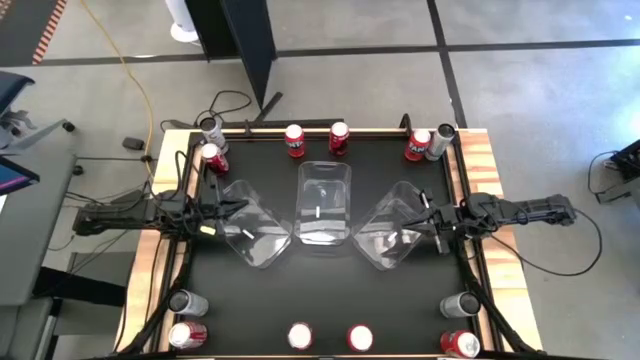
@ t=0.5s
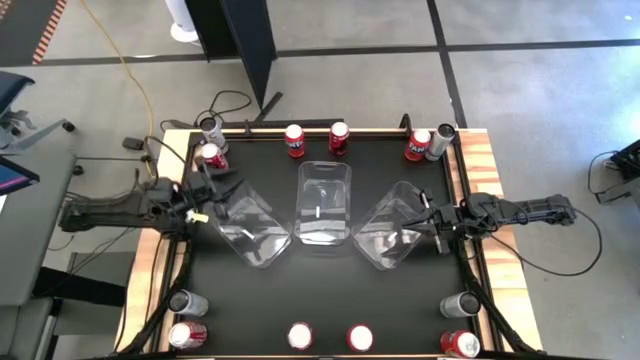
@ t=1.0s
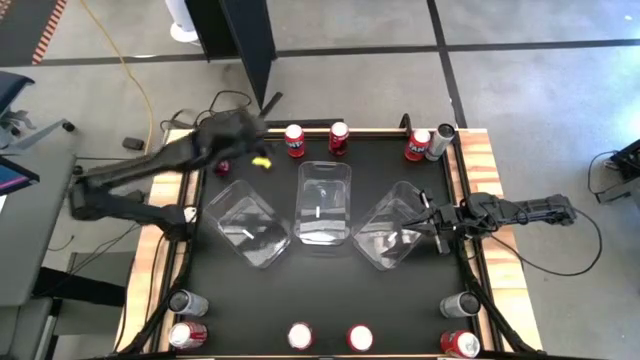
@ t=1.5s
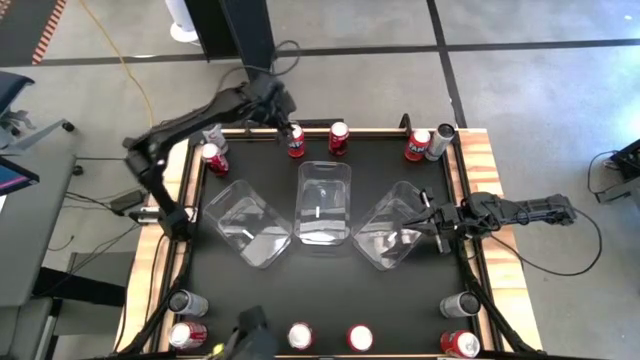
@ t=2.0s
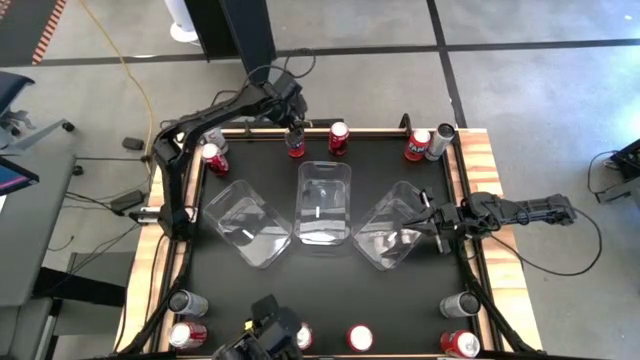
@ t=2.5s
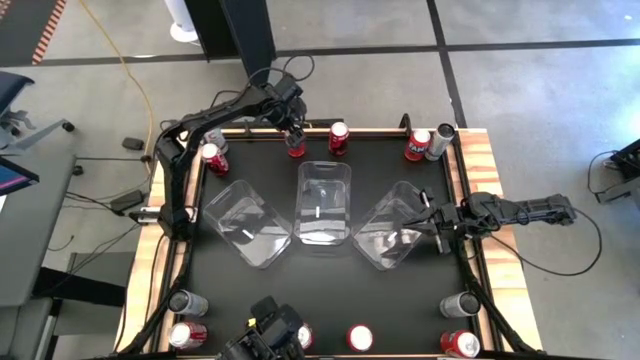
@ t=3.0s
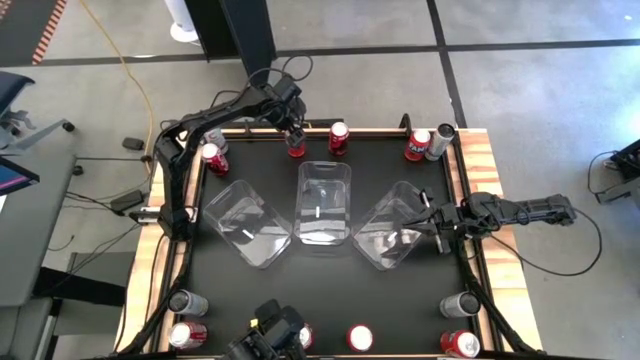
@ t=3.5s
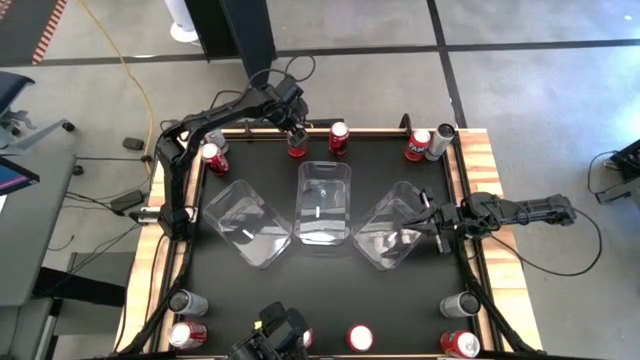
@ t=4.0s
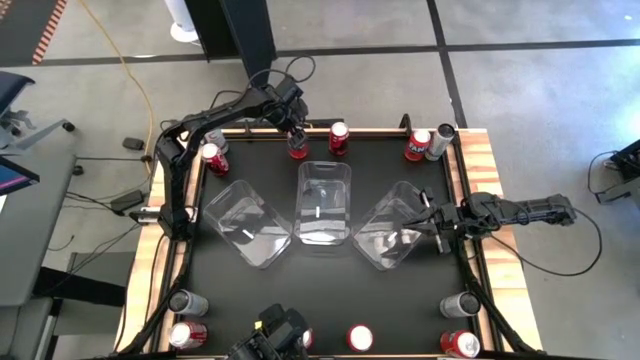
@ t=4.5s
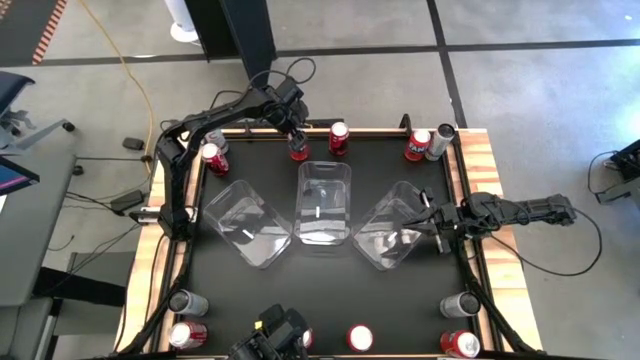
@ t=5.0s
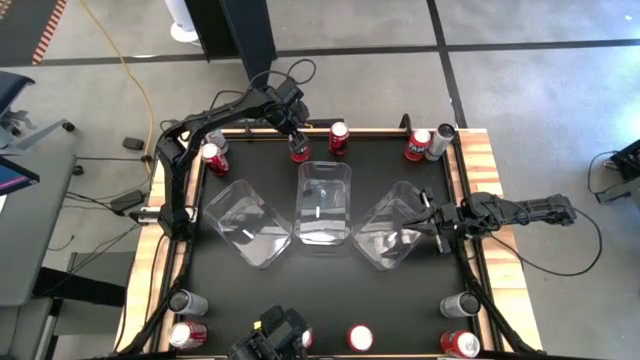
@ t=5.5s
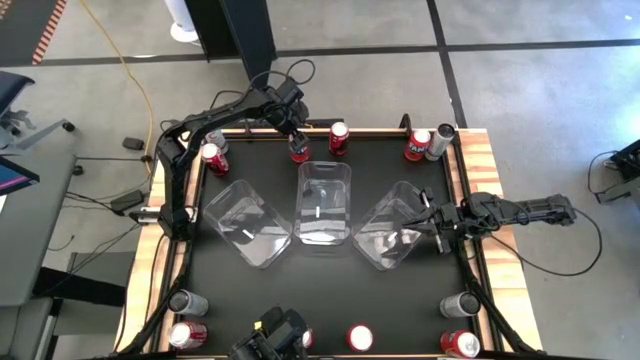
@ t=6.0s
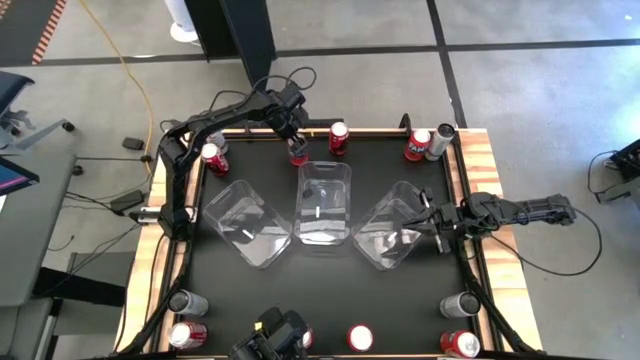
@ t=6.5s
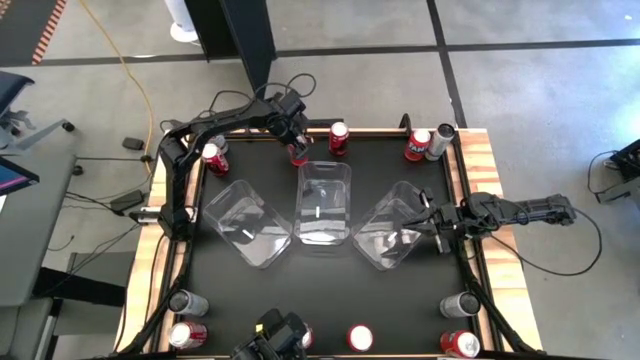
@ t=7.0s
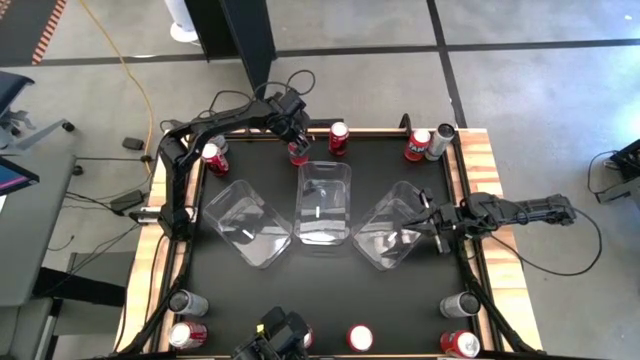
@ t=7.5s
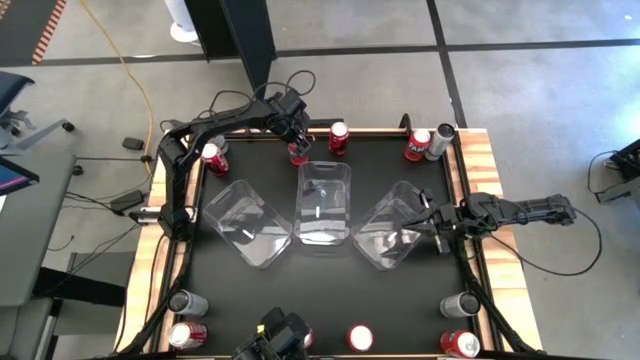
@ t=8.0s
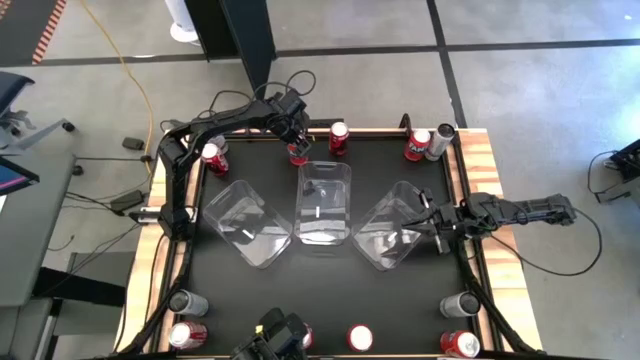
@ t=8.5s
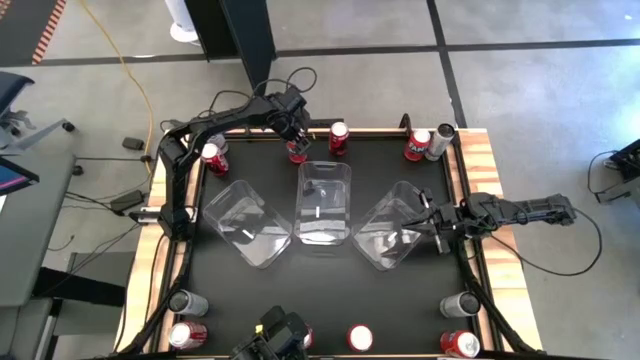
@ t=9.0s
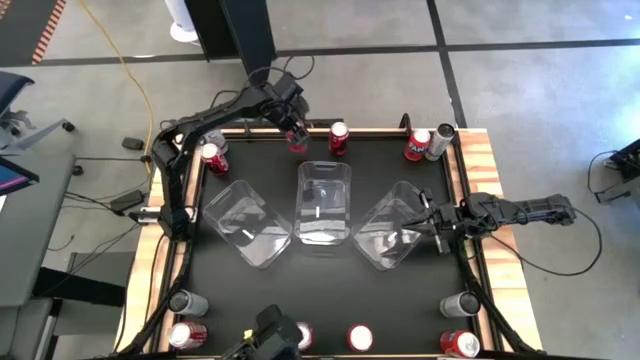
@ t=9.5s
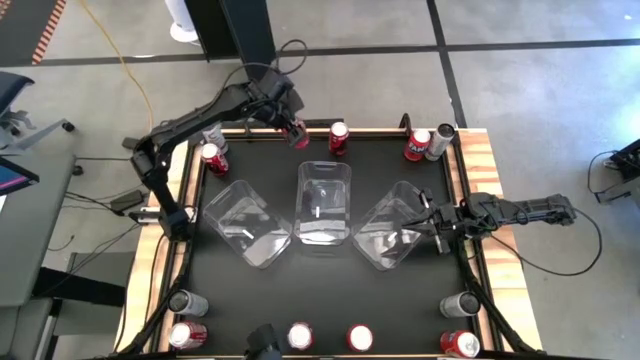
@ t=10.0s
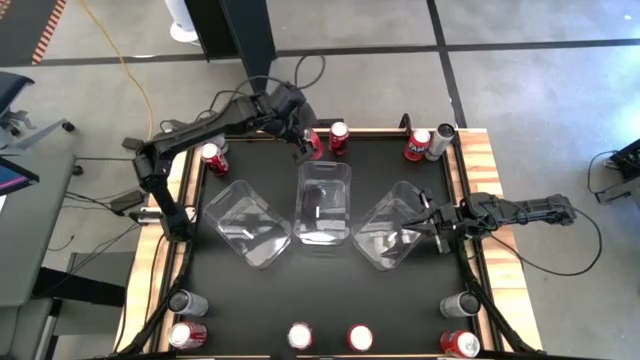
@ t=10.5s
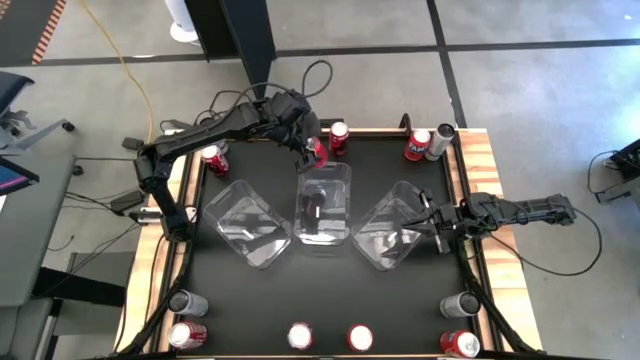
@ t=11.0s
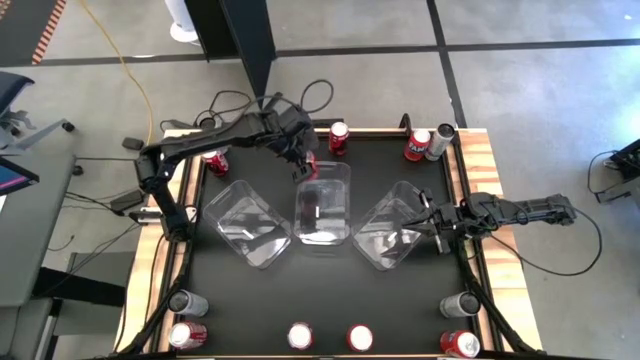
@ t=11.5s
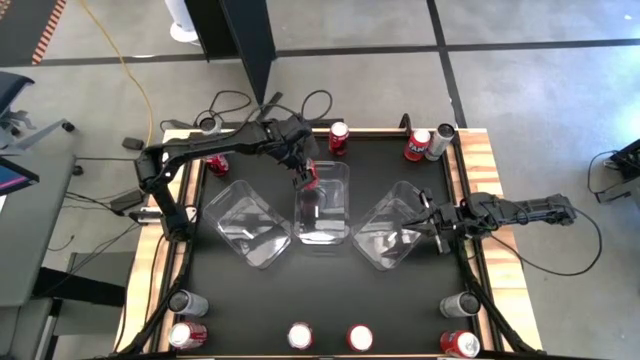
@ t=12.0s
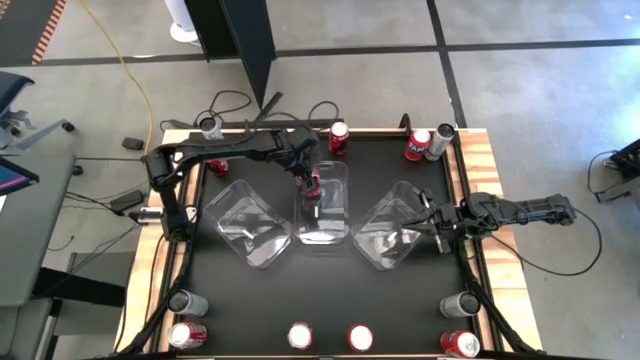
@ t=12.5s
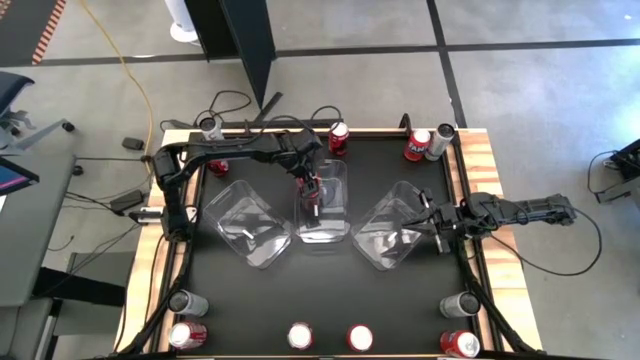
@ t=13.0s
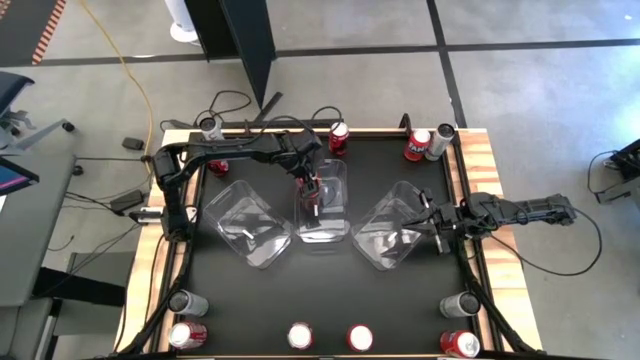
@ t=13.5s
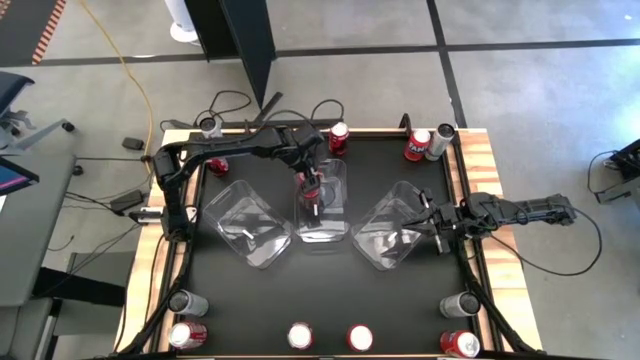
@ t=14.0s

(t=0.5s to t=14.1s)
Task: Sort soda cans
Put the top center orange soda can into the center transparent bin

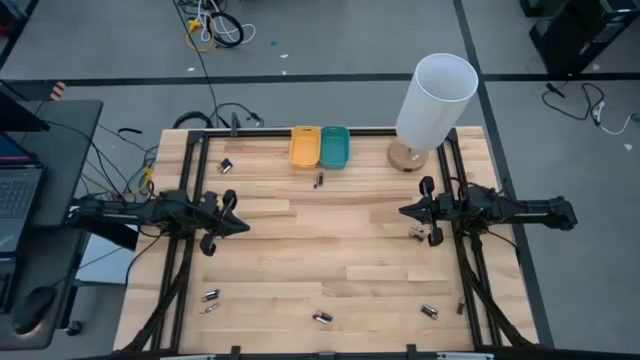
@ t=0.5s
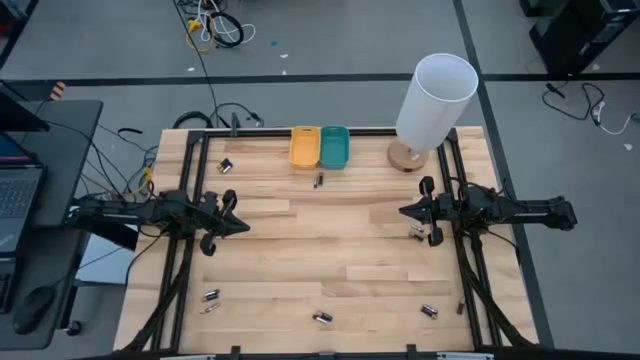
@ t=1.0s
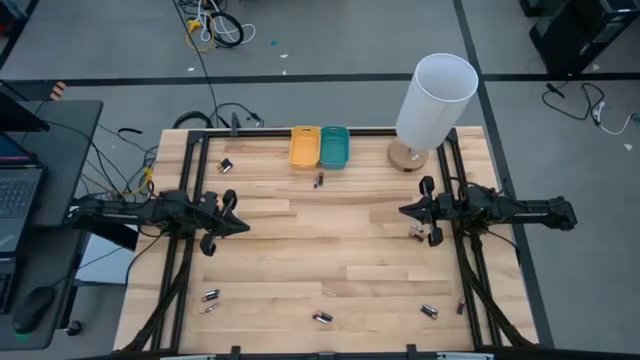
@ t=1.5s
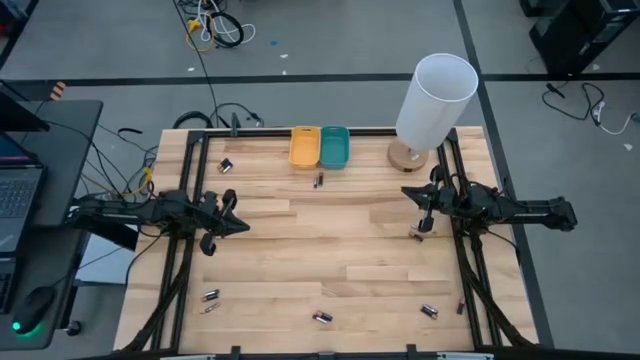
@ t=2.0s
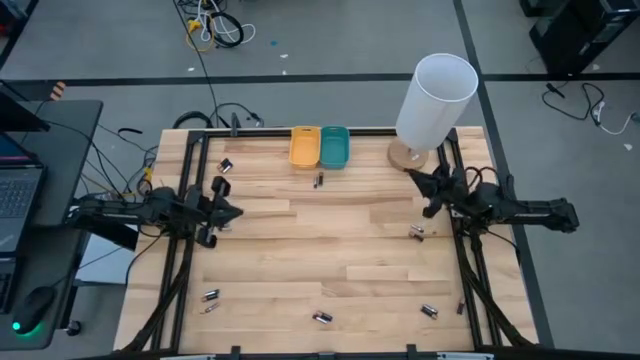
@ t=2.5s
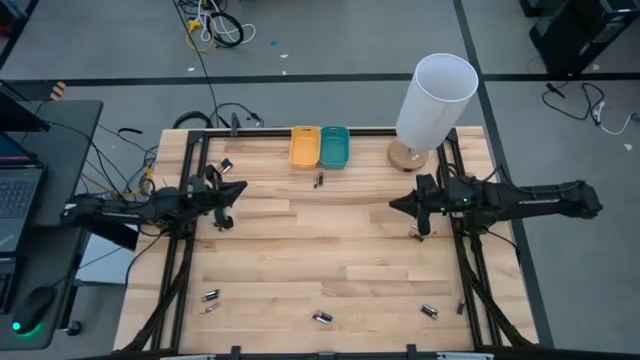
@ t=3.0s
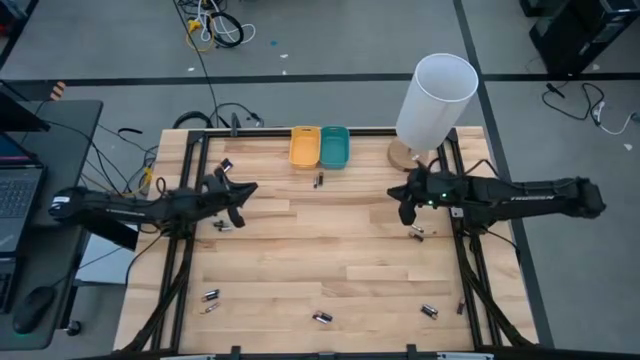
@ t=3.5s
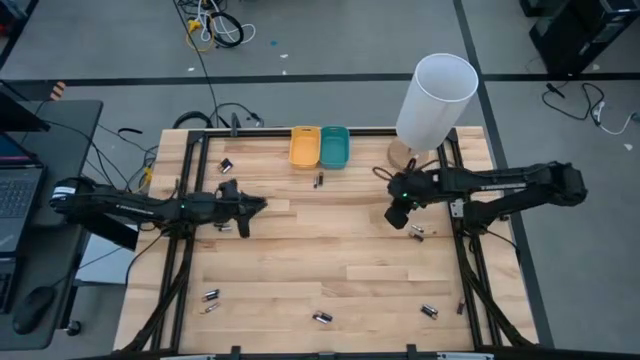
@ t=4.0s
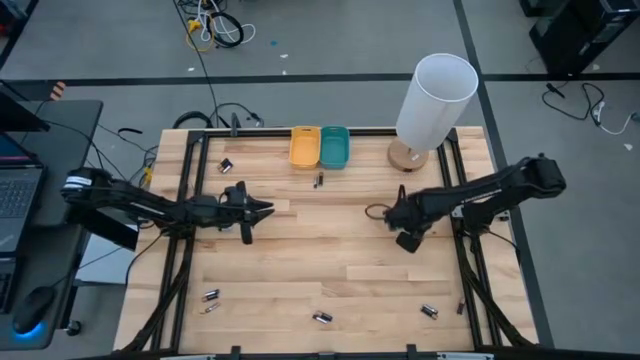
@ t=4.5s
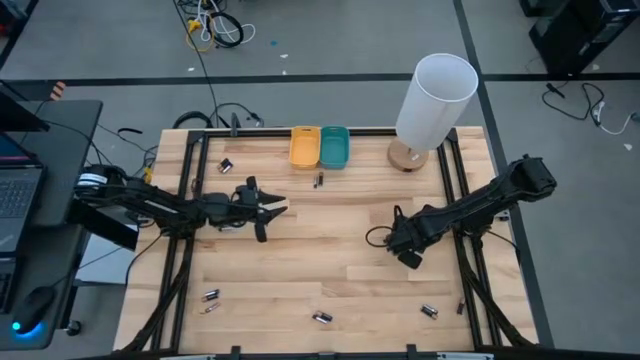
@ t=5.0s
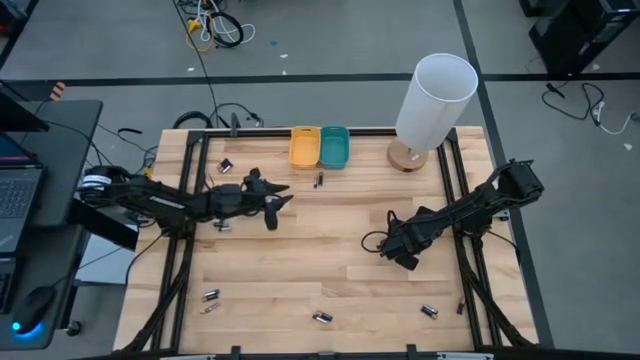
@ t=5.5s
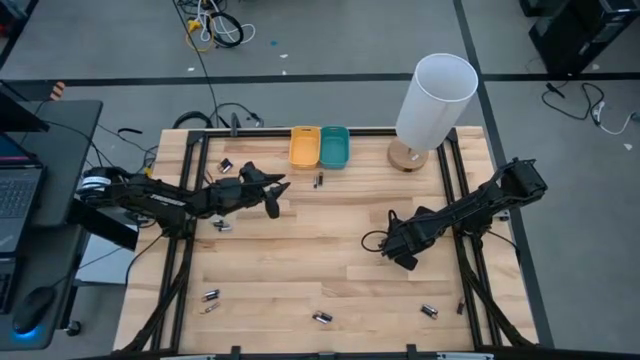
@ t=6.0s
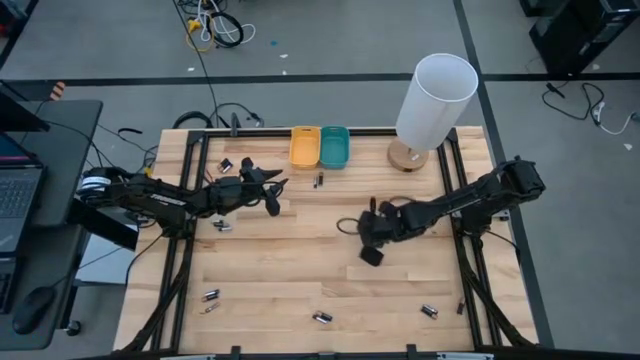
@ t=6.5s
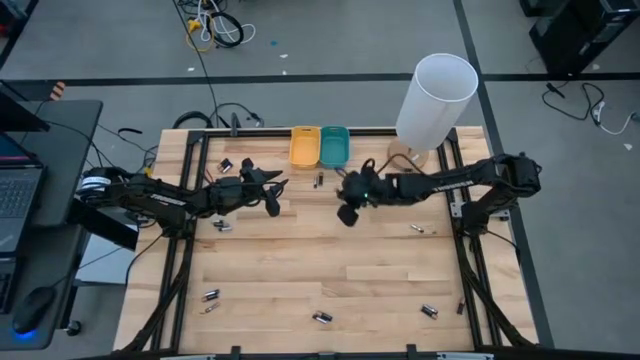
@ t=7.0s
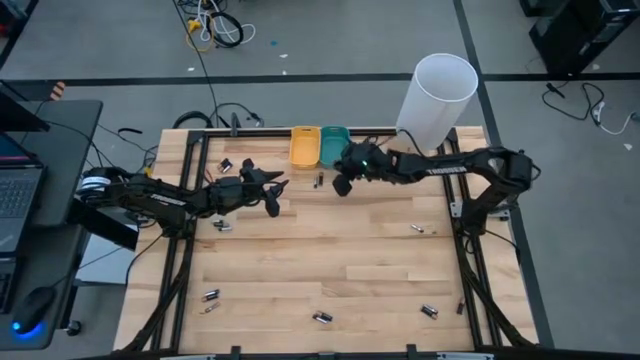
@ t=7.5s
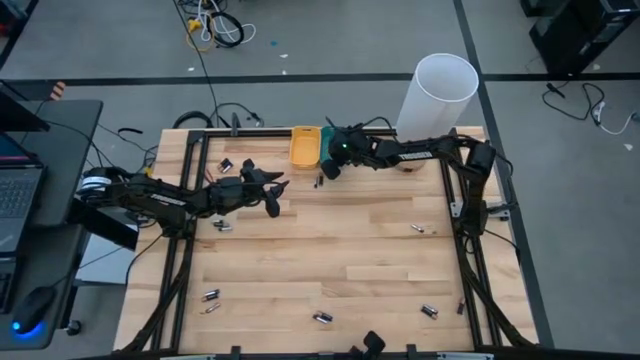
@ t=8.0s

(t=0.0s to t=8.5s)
Task: Sort batteries
Put the black battery into the green bin
